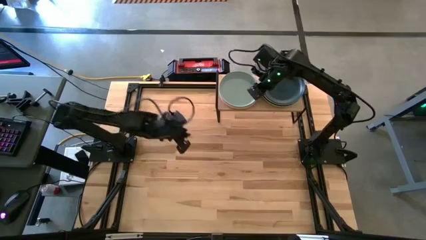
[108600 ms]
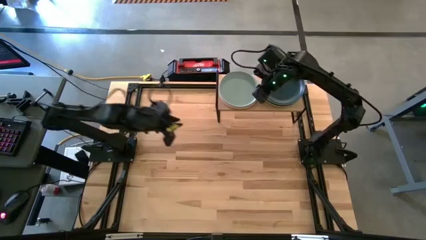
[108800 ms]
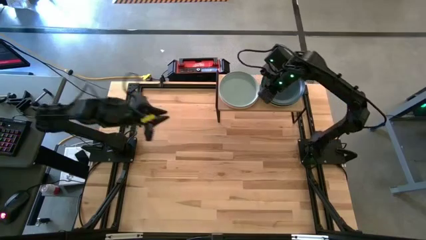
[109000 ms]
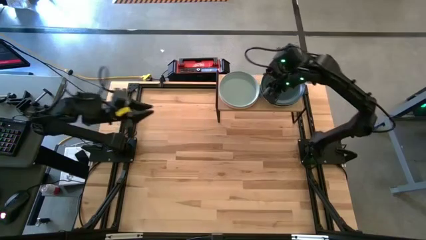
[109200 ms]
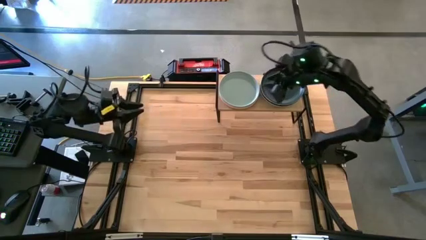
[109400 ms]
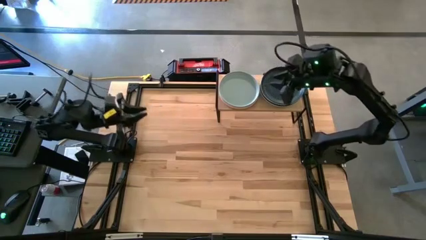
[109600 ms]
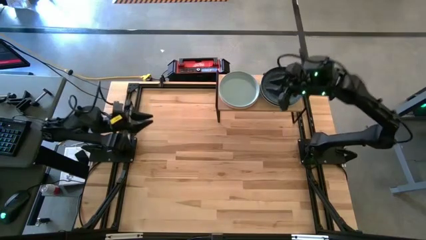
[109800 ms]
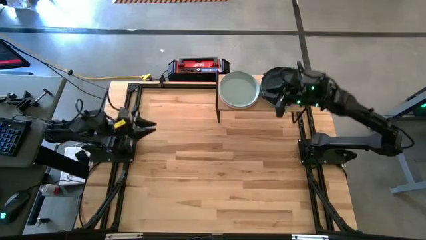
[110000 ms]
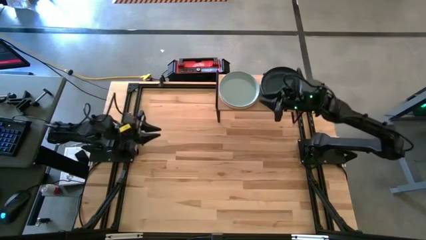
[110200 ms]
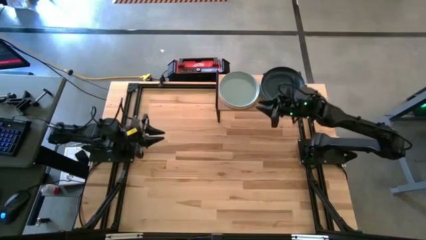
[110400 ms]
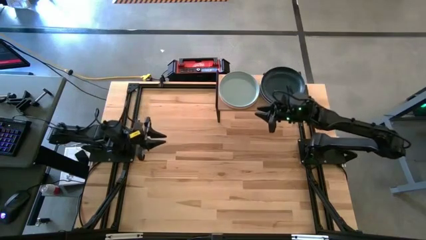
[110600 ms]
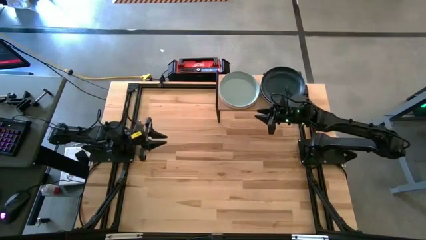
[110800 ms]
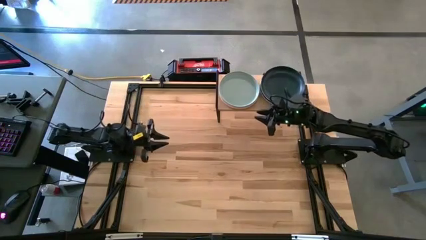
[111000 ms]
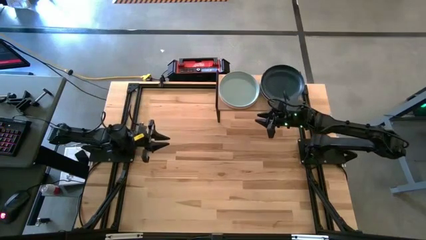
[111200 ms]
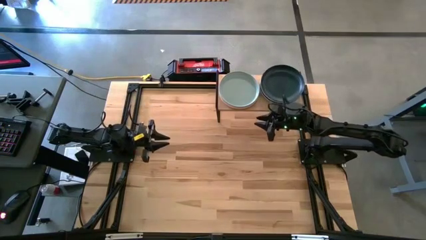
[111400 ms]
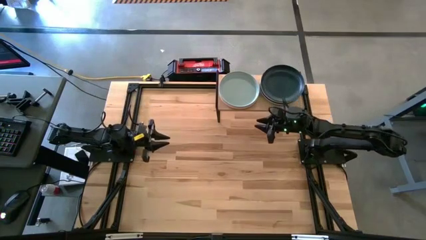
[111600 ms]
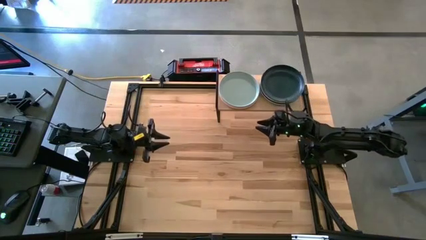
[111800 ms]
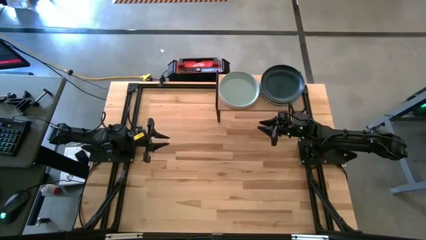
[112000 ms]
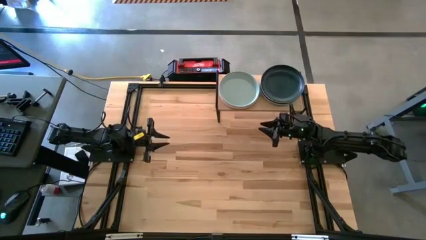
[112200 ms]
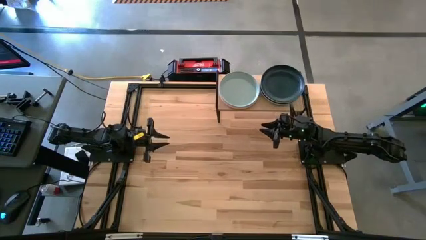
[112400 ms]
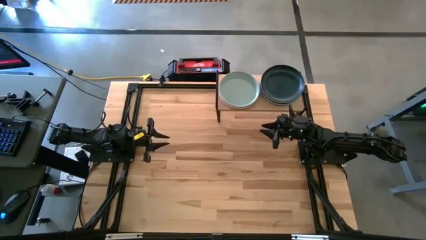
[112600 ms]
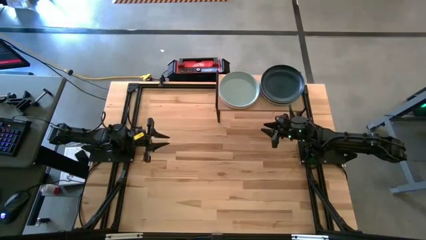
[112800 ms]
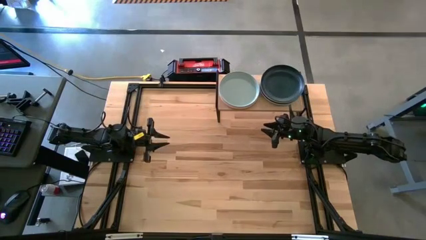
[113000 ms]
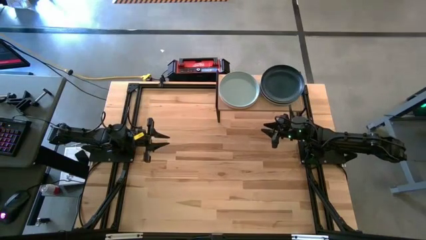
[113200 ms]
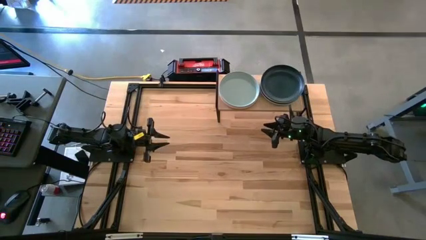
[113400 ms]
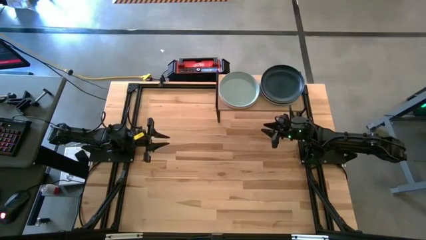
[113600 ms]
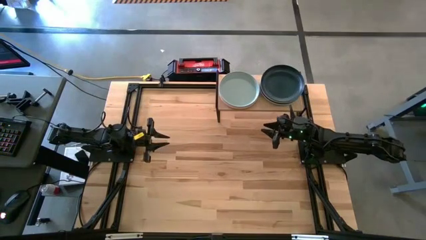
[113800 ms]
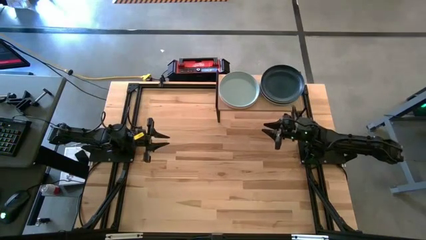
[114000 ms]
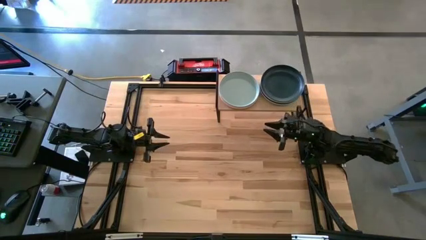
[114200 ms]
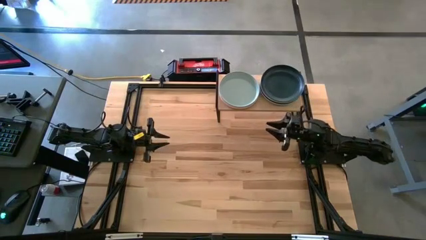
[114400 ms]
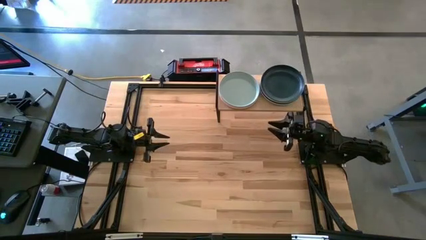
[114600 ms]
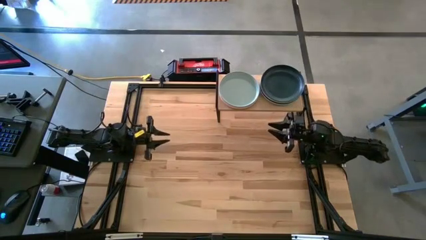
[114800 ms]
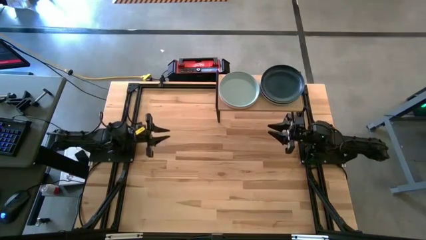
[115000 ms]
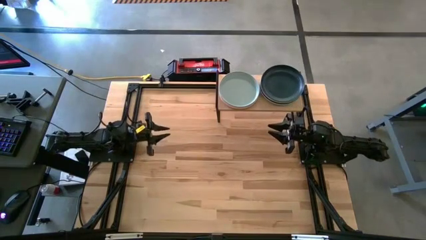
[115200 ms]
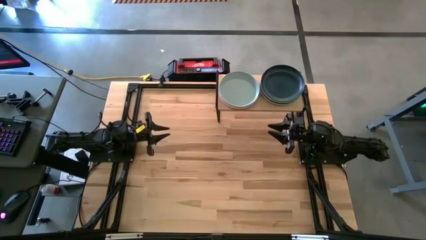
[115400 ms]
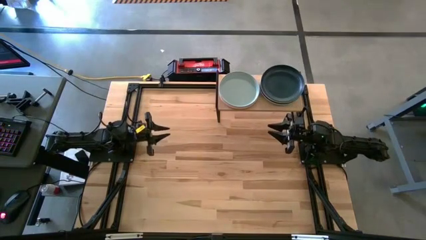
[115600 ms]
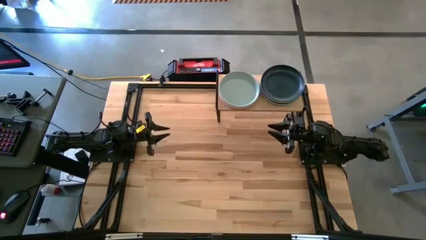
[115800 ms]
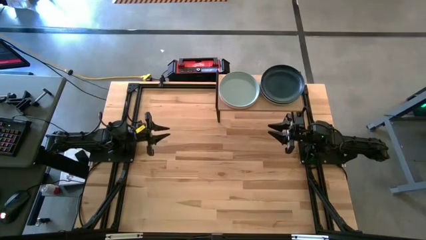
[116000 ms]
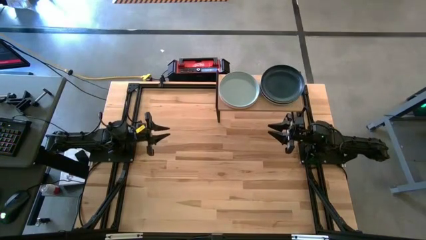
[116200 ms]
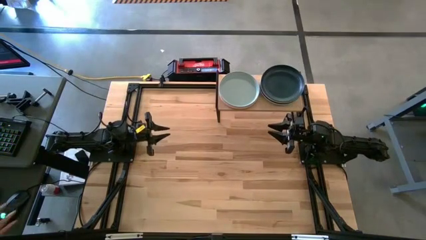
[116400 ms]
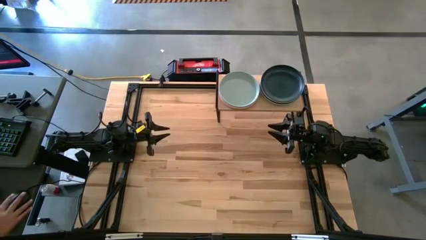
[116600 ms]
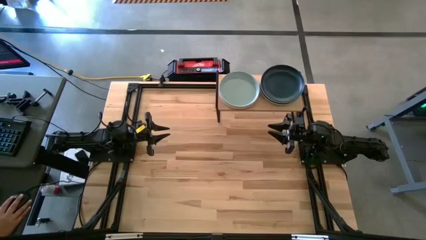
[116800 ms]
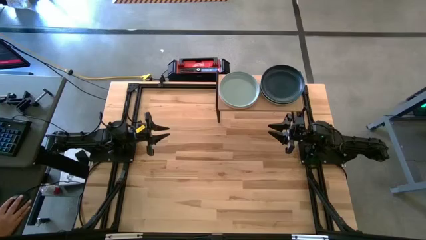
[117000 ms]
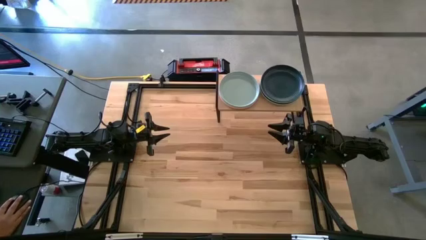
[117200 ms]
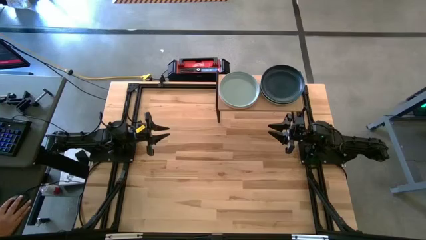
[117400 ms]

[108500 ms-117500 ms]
Task: Place and stack plates onto a shelf
Return to Home Position

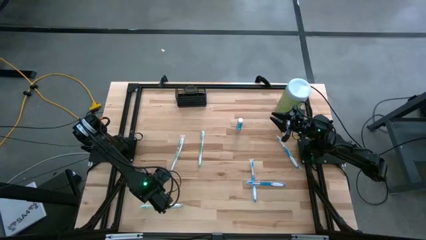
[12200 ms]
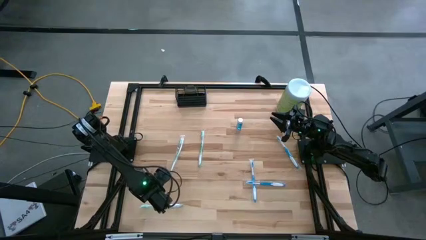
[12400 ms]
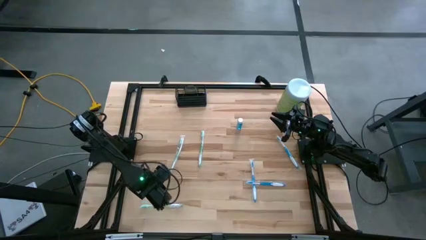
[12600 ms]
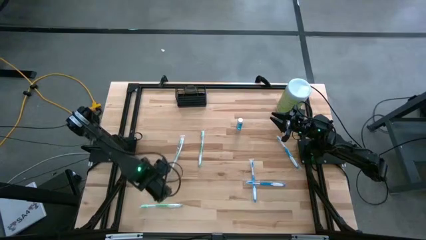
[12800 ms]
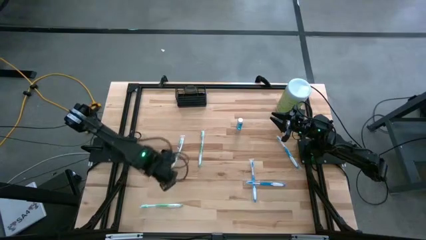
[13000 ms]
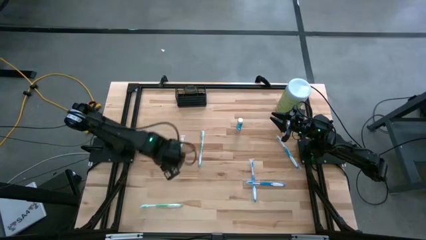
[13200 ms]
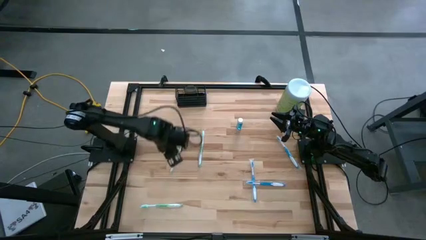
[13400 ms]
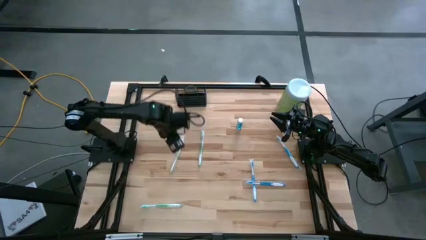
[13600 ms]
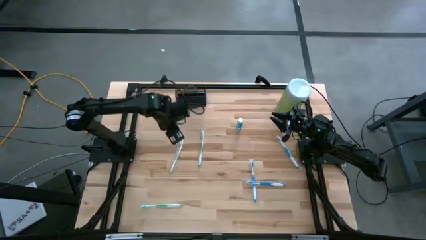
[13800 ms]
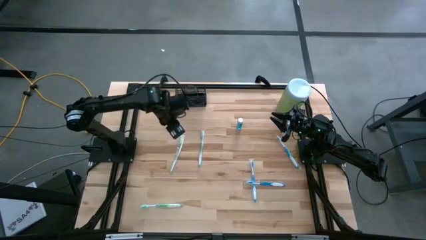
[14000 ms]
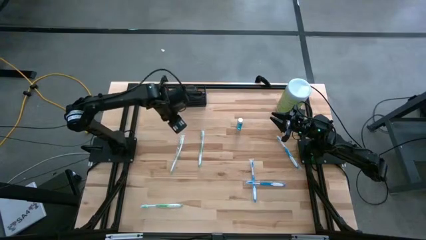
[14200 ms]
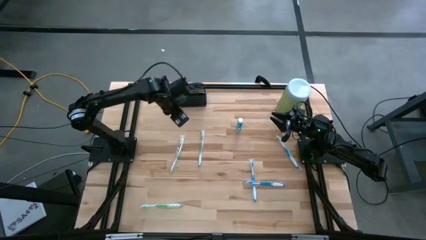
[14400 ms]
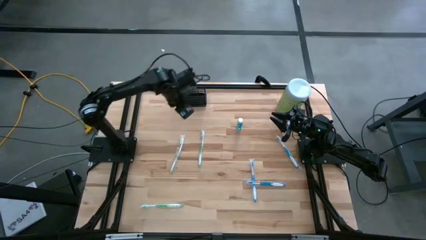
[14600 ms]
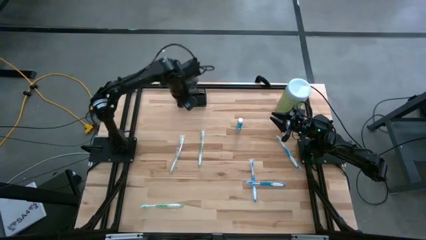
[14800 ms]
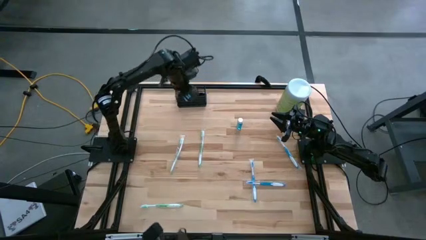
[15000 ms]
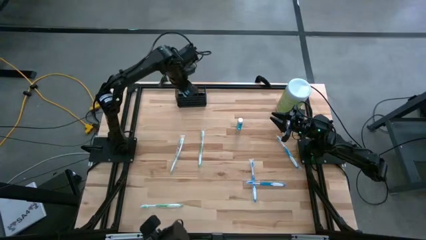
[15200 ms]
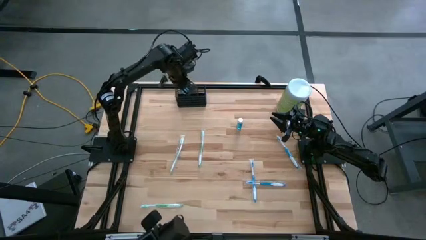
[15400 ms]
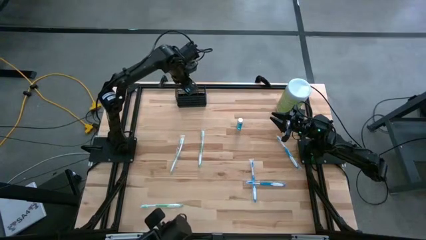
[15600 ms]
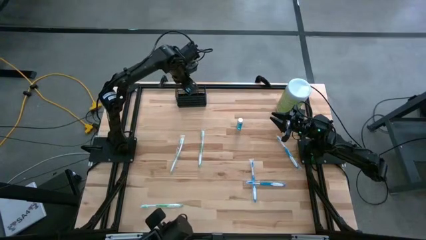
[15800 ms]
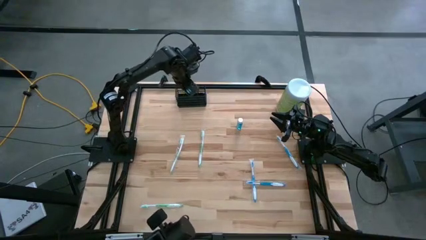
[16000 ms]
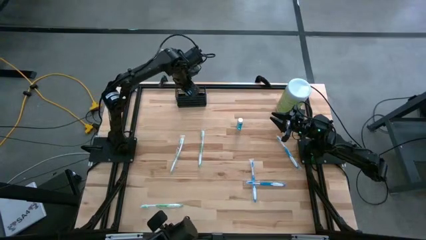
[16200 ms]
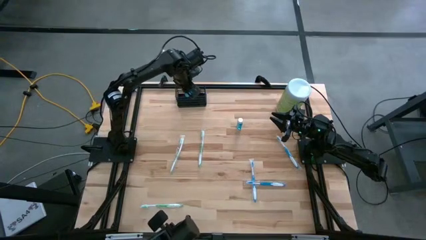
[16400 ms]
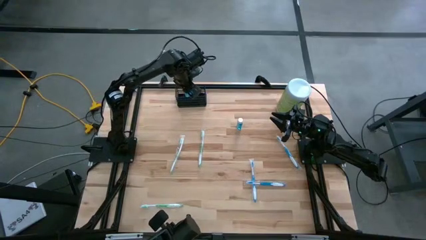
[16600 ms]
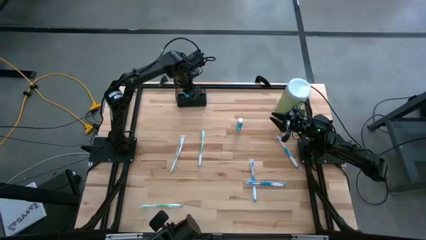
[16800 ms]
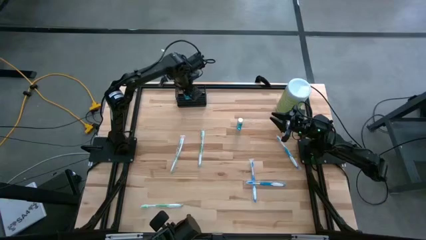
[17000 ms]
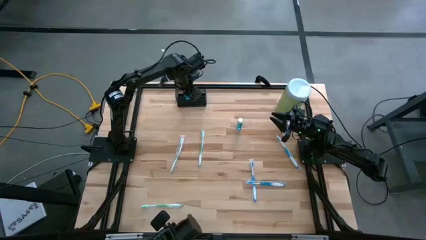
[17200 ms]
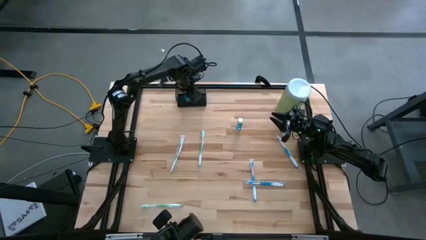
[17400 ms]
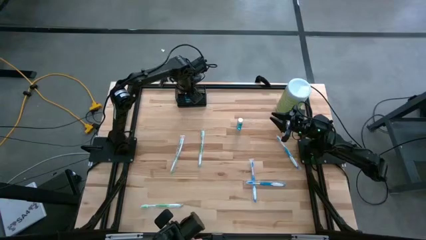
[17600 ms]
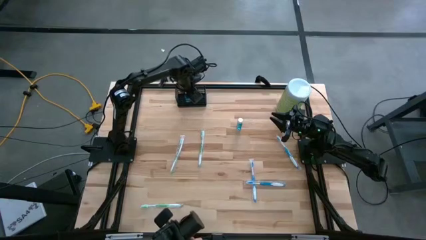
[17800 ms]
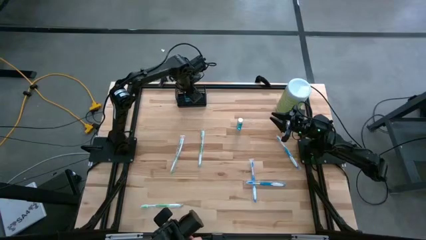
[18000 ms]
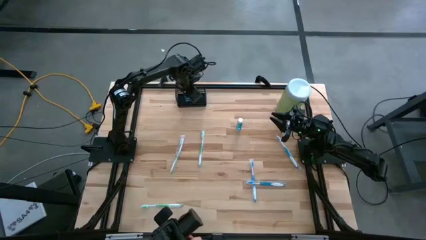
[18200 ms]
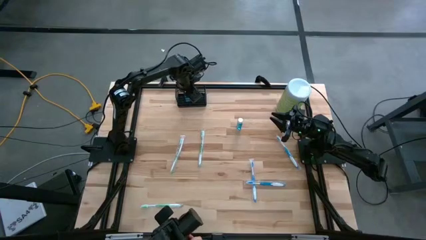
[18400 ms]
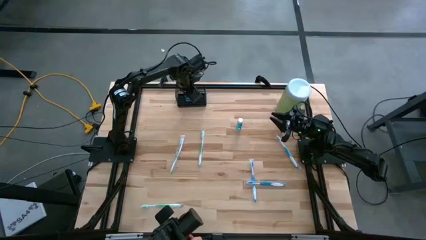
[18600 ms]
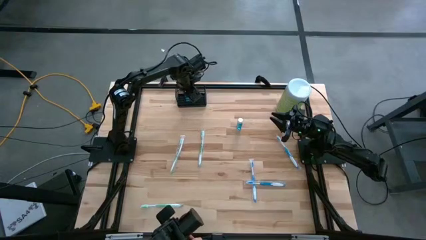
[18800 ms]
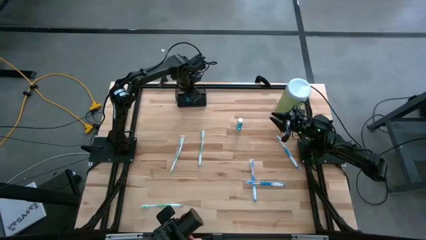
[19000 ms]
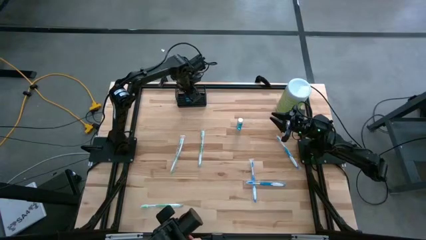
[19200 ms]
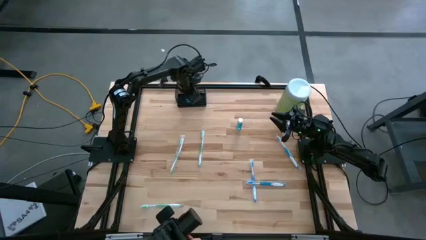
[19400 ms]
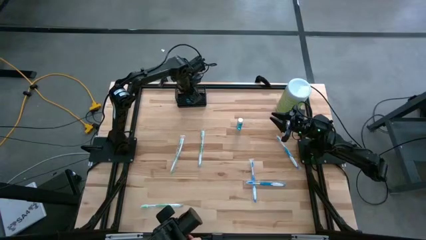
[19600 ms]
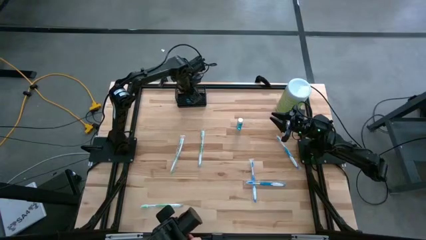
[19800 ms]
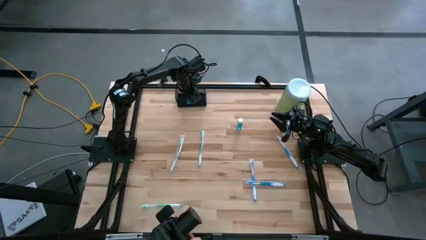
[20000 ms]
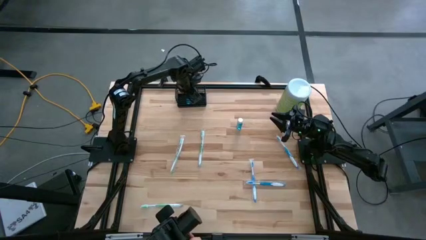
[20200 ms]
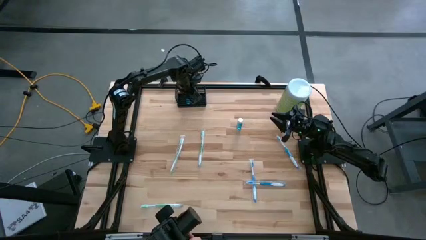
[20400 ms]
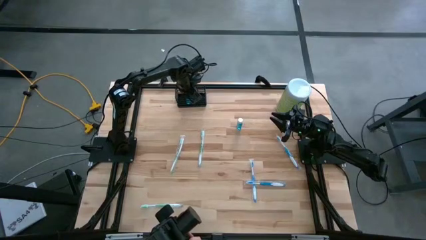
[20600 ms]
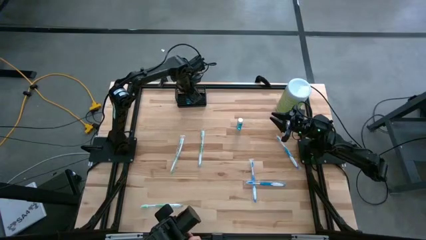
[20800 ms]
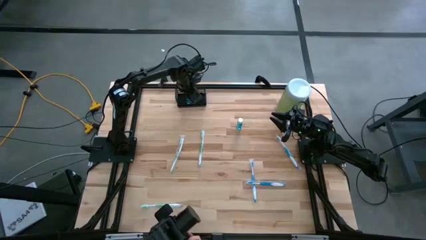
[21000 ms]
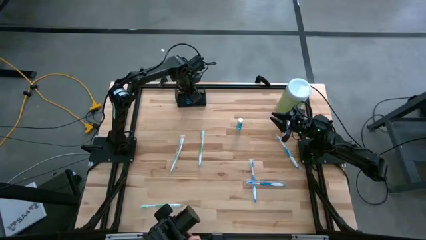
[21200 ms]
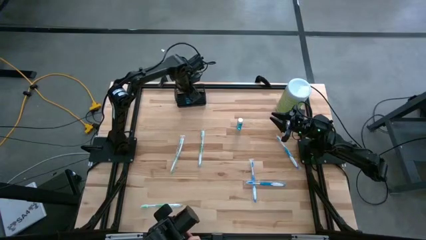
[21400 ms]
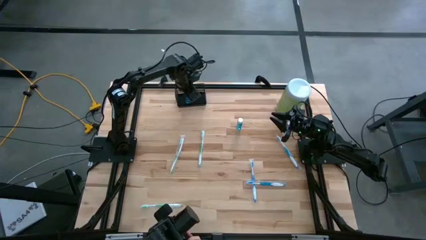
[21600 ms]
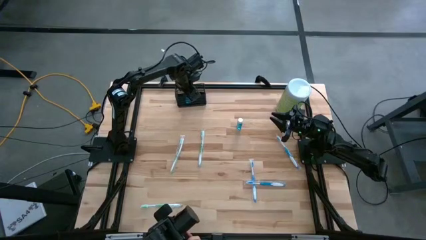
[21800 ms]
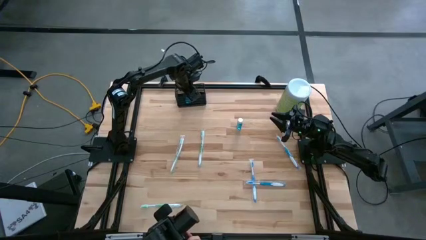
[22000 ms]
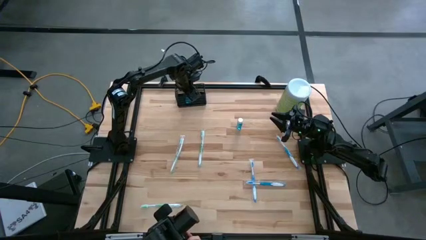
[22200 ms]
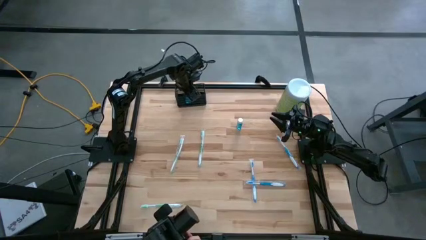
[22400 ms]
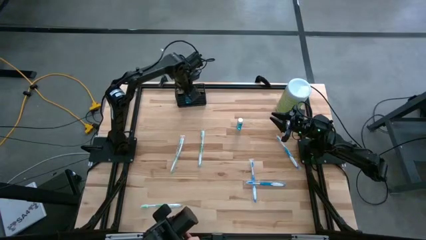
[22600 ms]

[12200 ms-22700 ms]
Task: Pick & Place toothbrushing station
Put the bottom blue mouthwash bottle into the wire organizer
